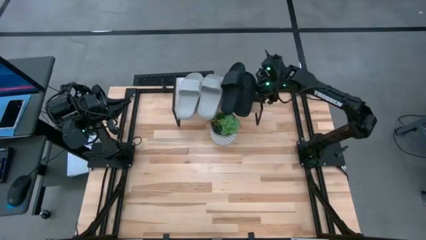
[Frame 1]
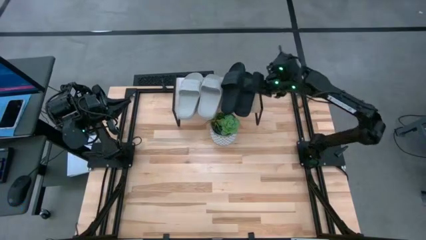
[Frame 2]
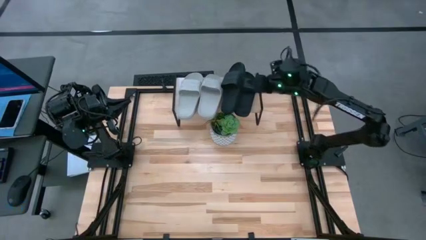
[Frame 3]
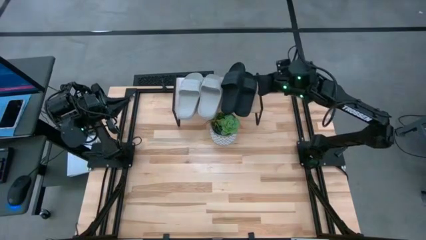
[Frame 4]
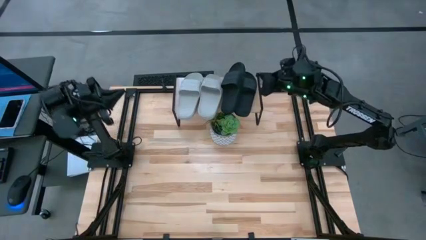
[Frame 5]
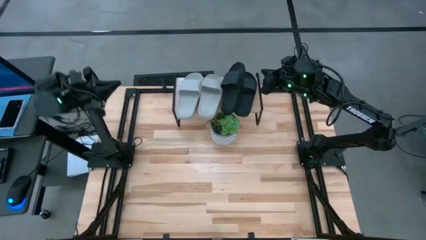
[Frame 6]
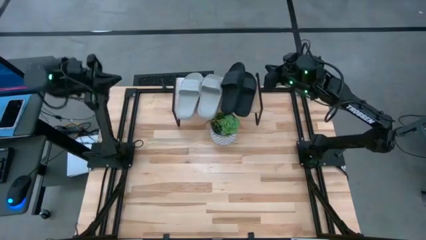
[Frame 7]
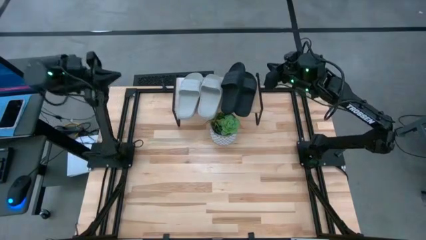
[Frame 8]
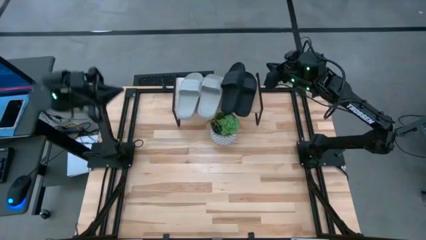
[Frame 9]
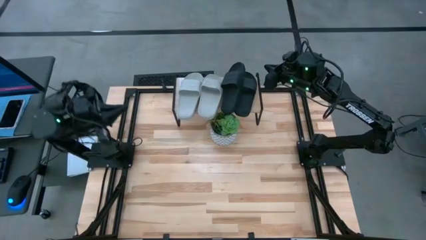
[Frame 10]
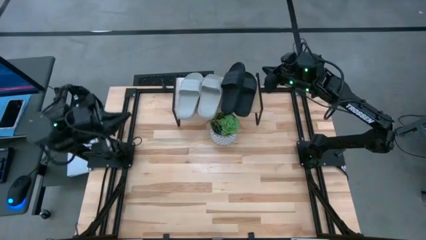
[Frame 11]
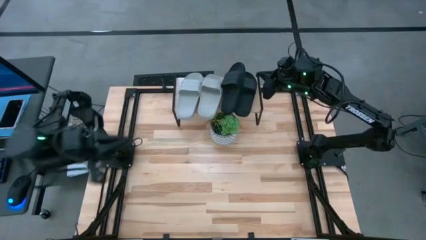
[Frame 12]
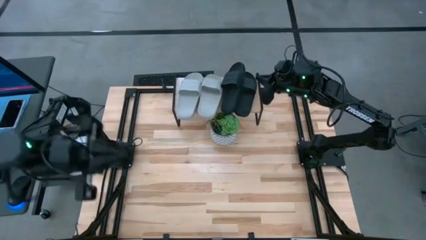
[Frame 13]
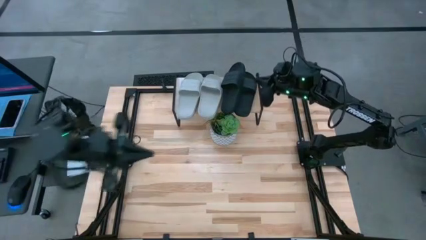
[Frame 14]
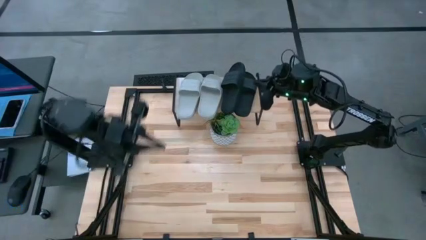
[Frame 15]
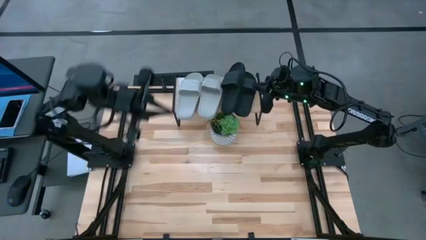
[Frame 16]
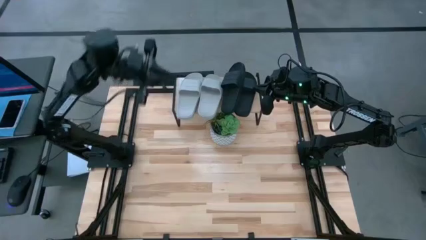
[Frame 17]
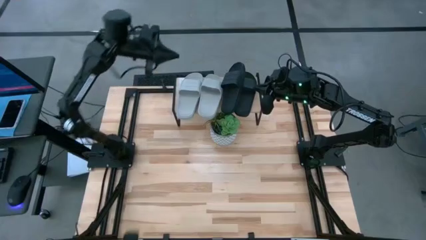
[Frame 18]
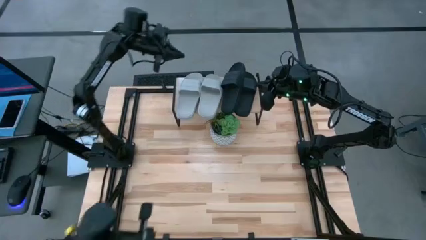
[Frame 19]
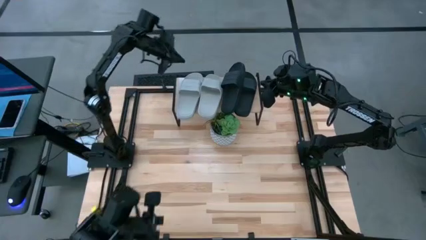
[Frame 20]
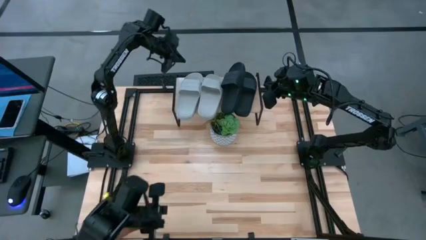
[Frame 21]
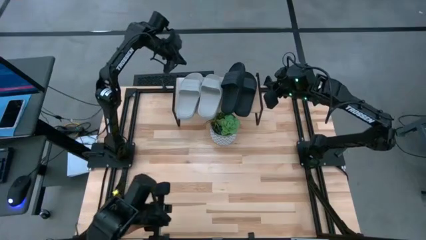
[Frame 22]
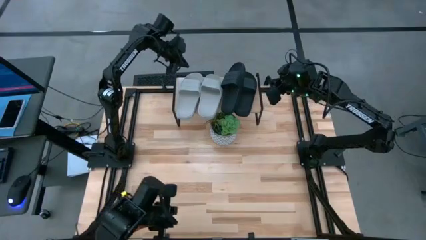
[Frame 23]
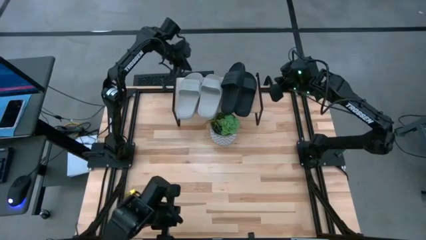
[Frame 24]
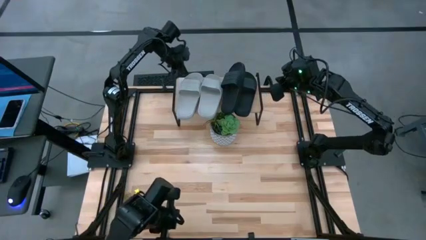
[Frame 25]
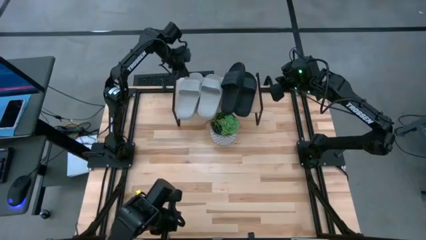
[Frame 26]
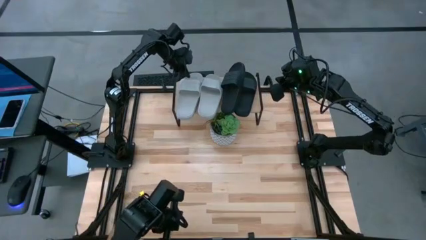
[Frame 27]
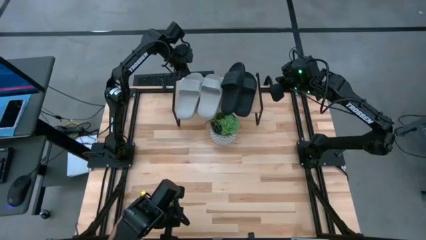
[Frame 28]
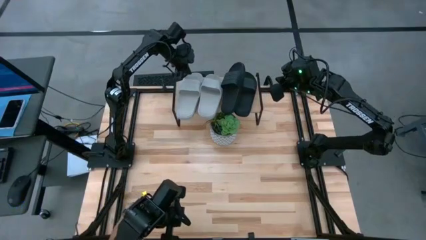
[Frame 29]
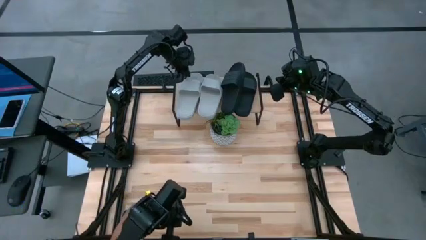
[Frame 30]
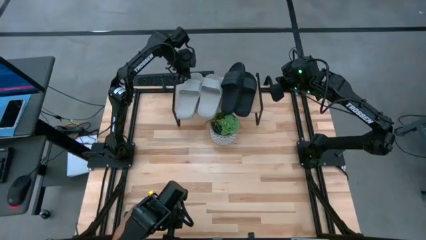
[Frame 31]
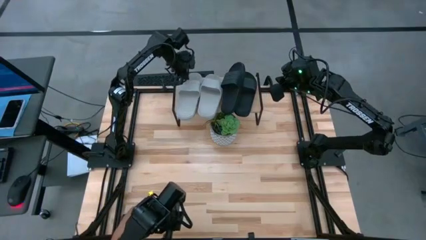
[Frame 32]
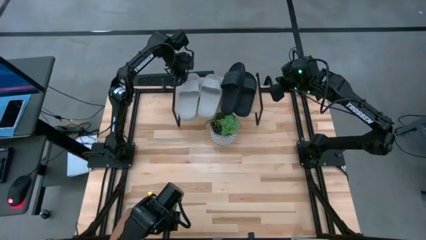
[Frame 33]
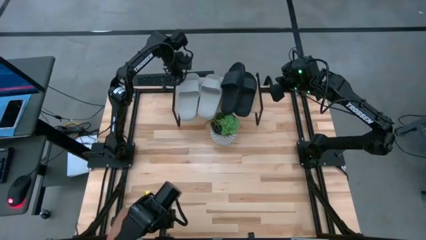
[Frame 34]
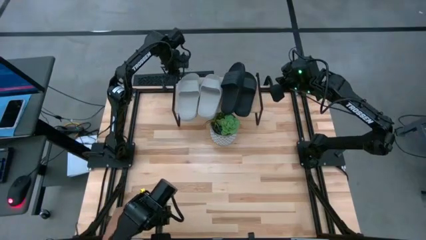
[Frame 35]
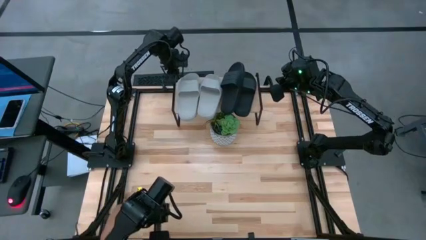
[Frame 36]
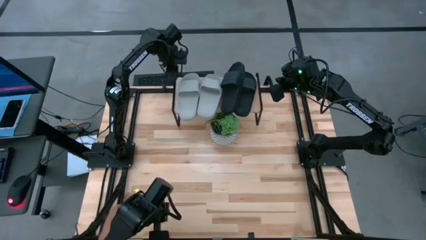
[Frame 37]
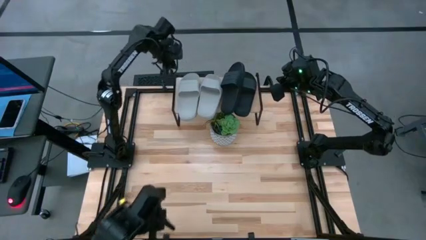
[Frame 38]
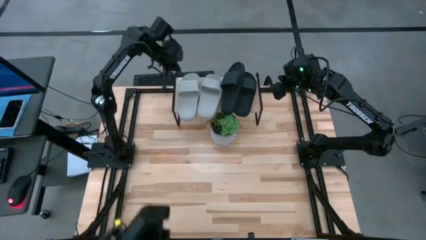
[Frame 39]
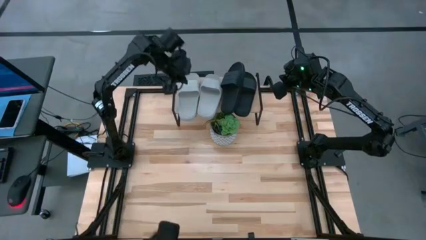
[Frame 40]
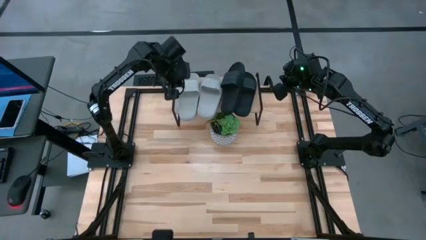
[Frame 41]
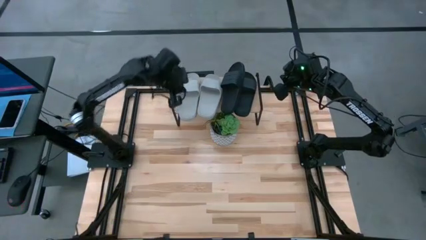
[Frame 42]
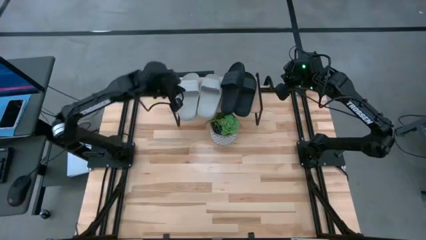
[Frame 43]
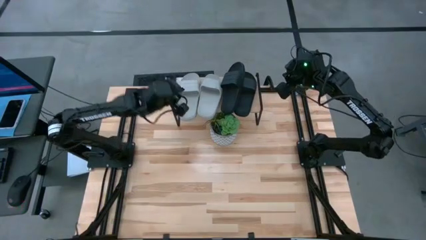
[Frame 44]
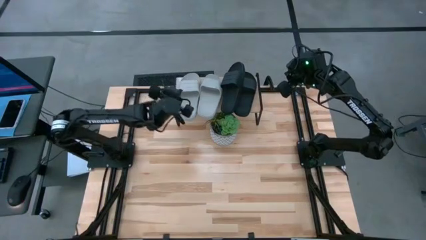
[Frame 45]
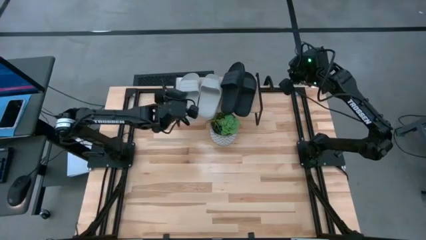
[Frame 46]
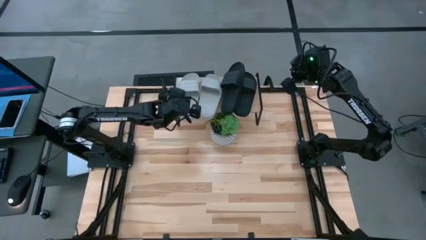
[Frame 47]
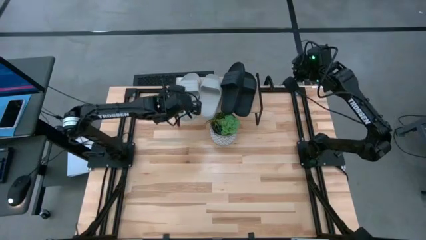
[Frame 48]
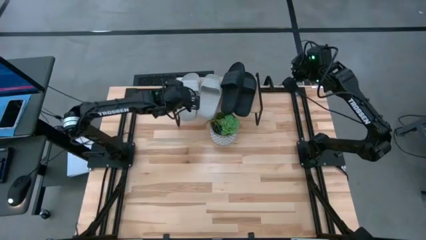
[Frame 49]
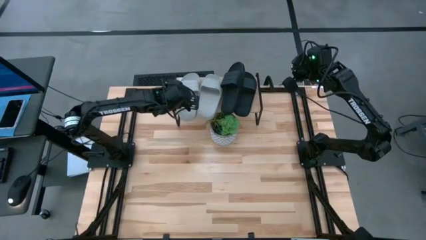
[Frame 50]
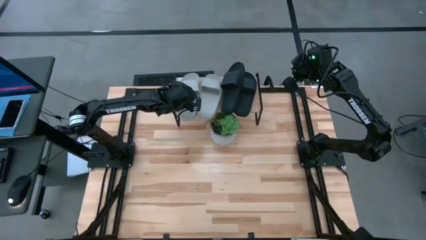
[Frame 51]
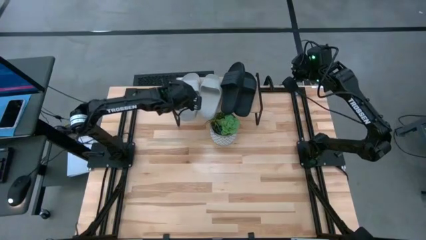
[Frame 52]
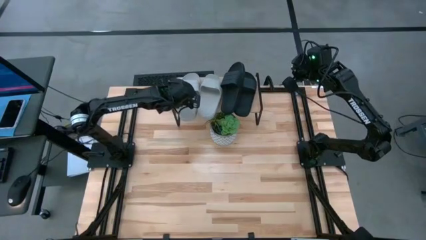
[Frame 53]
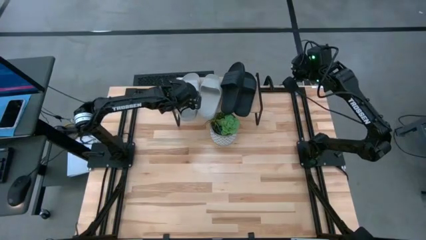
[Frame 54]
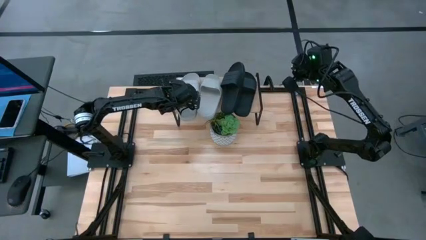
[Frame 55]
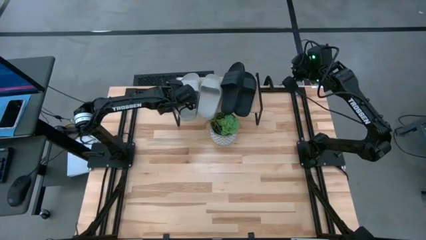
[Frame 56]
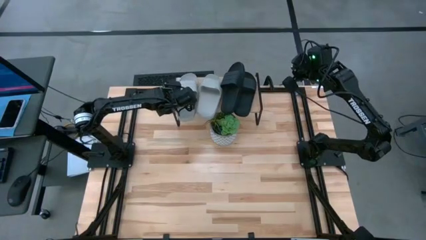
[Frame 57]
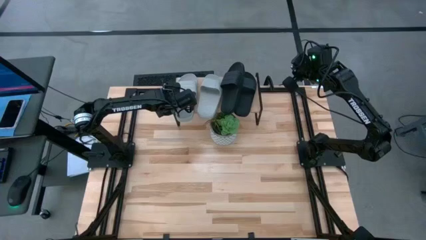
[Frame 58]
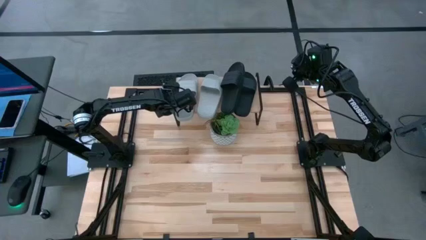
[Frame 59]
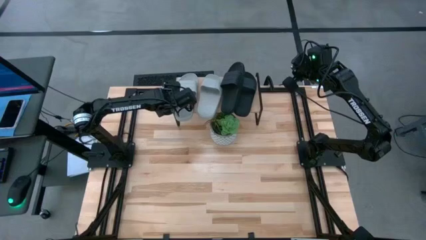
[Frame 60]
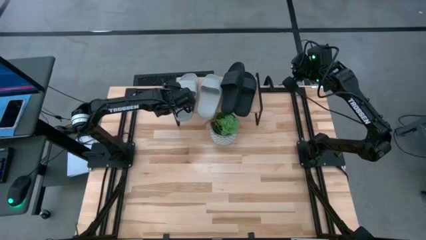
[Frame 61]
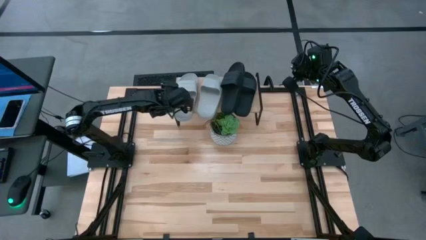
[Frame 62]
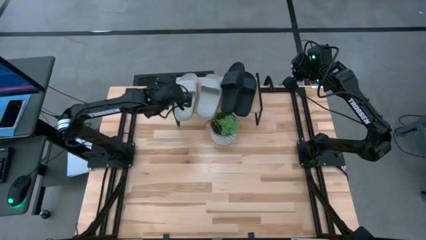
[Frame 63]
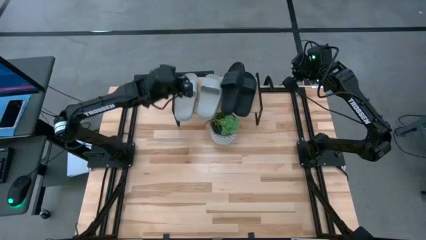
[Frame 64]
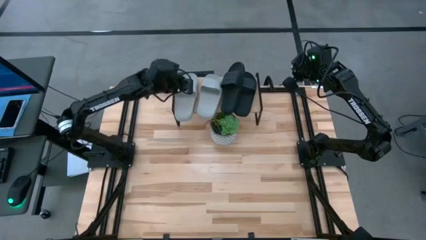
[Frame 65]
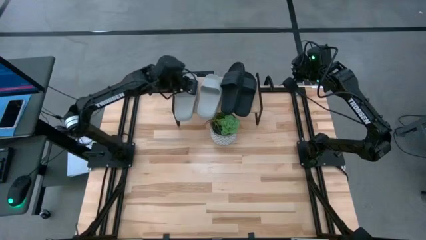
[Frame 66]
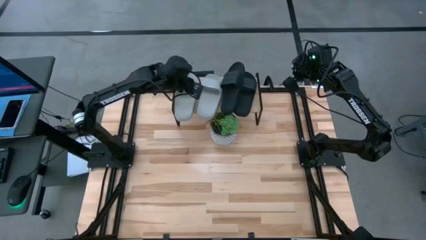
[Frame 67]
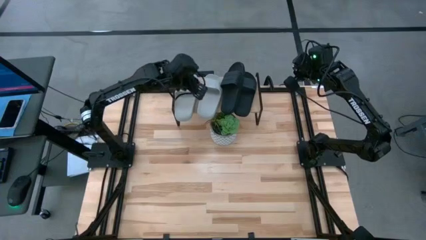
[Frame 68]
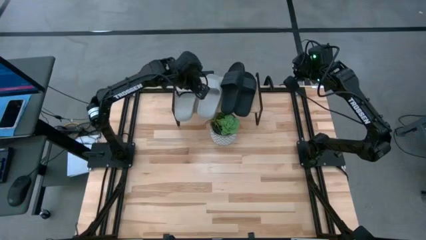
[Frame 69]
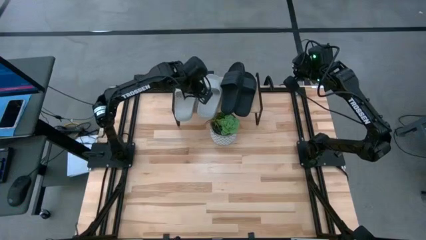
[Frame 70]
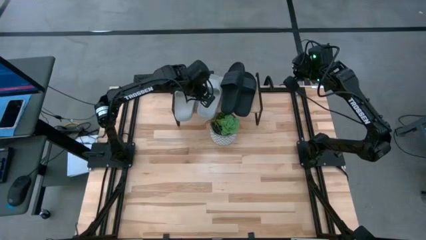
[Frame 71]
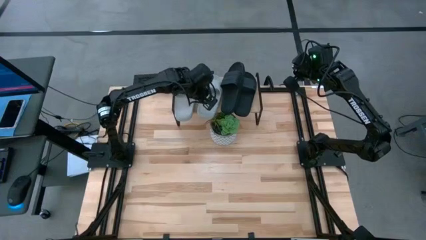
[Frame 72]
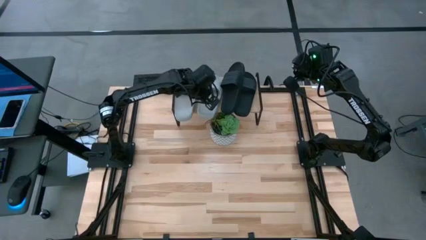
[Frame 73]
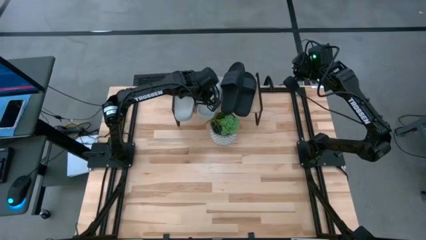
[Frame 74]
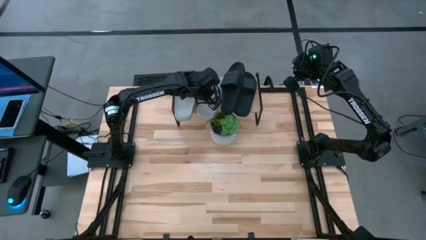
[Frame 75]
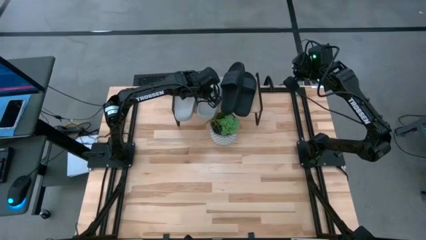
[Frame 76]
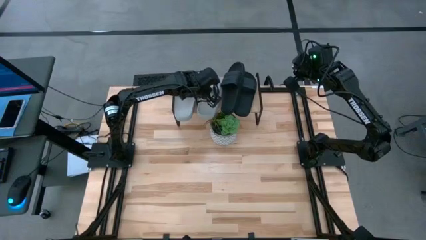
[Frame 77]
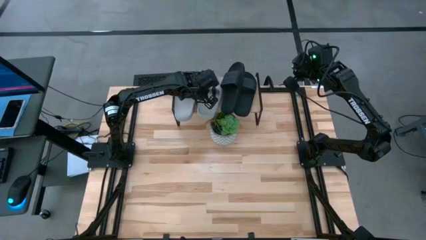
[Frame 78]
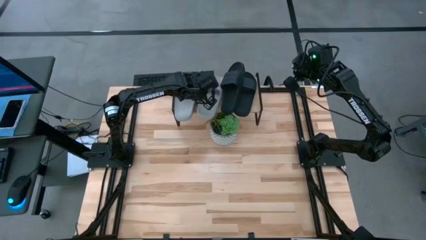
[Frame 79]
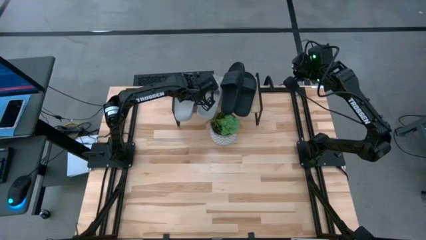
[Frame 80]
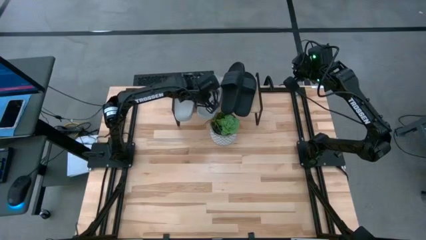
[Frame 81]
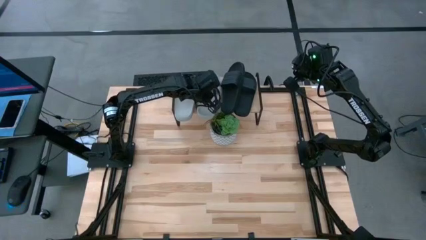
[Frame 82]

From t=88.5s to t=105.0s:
Task: Pick and place slides into the shelf
Adjust the slides on the shelf
